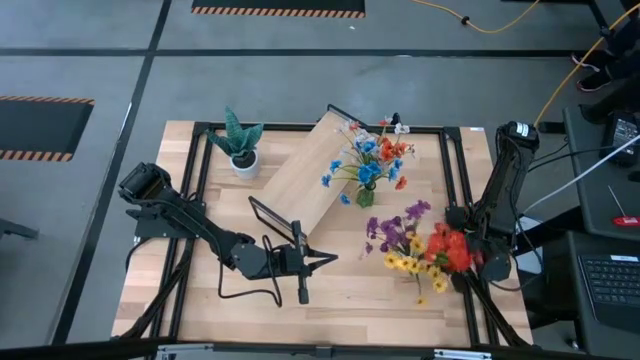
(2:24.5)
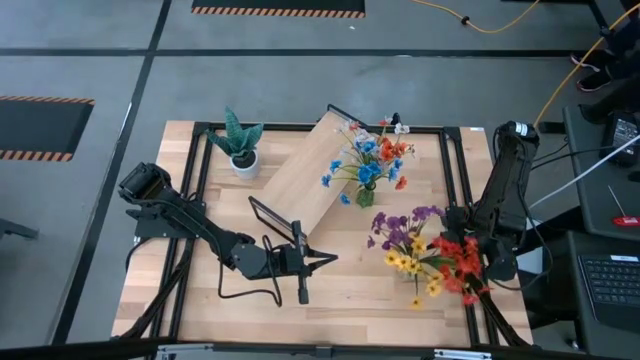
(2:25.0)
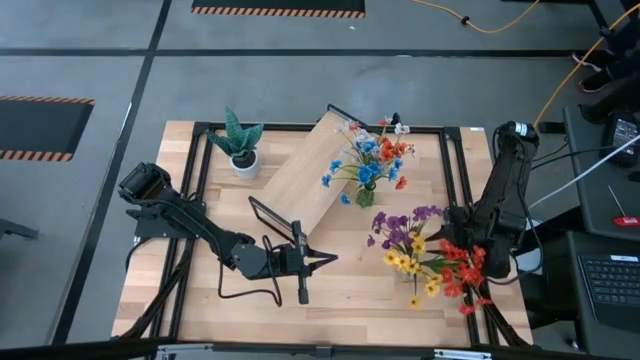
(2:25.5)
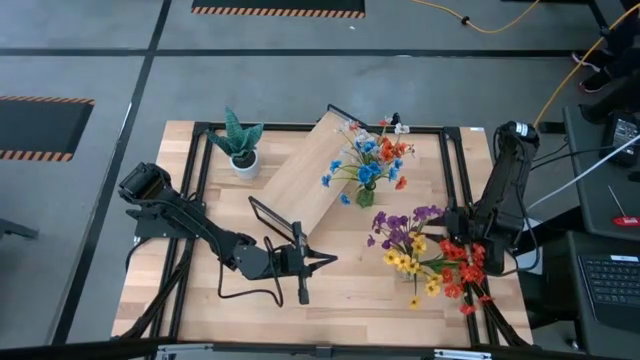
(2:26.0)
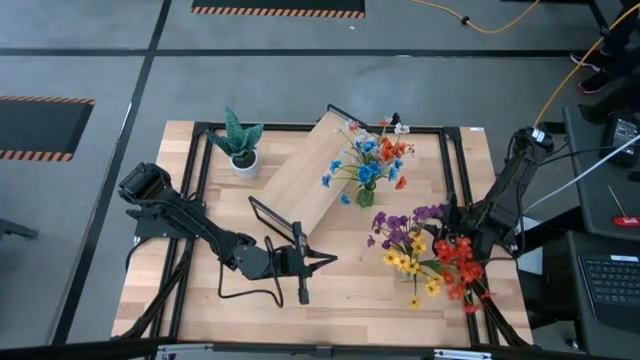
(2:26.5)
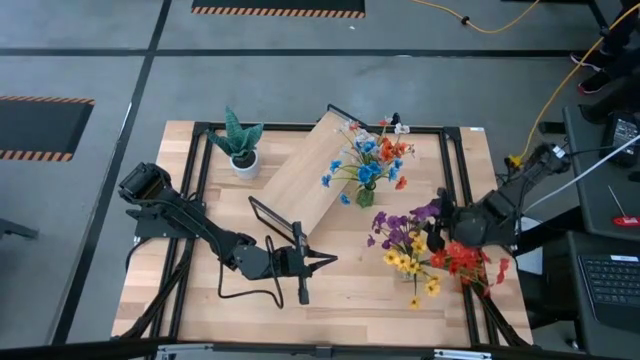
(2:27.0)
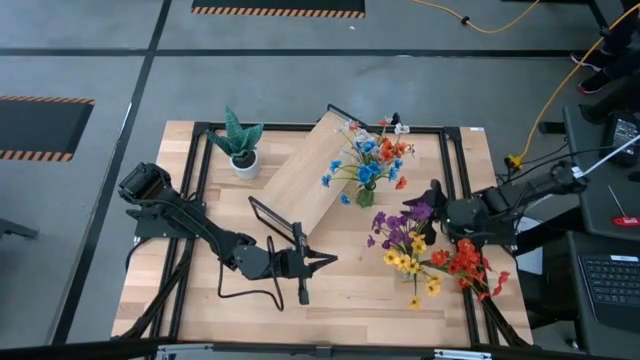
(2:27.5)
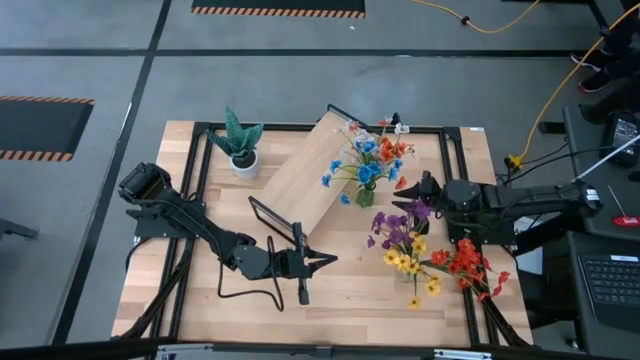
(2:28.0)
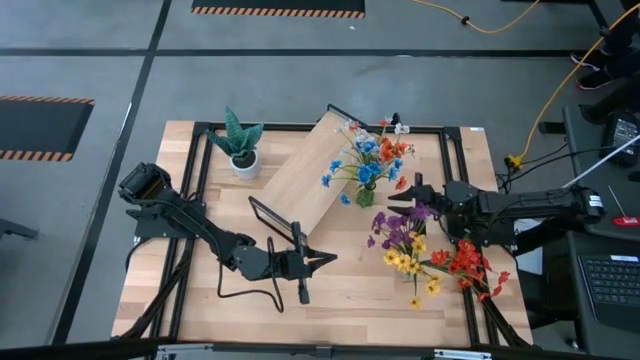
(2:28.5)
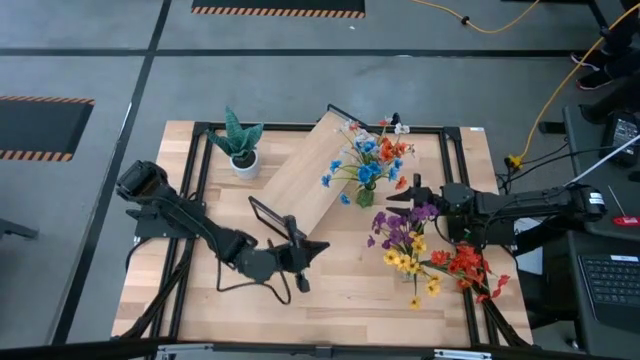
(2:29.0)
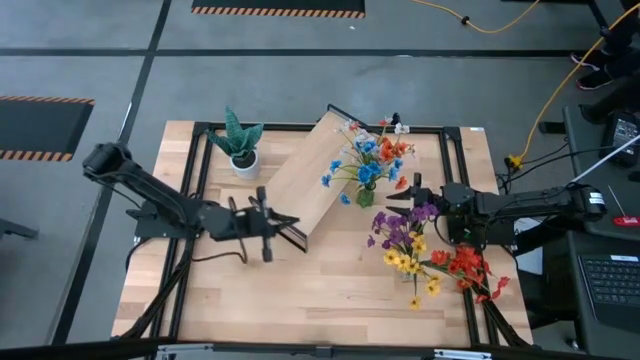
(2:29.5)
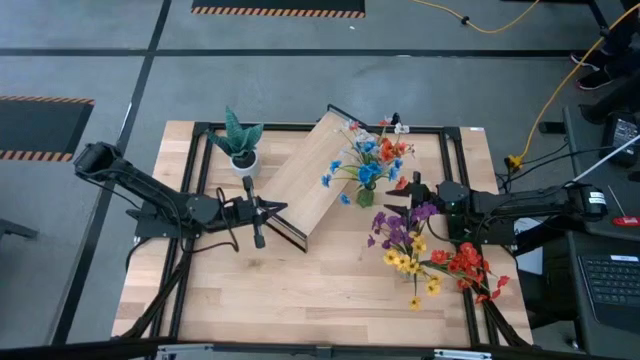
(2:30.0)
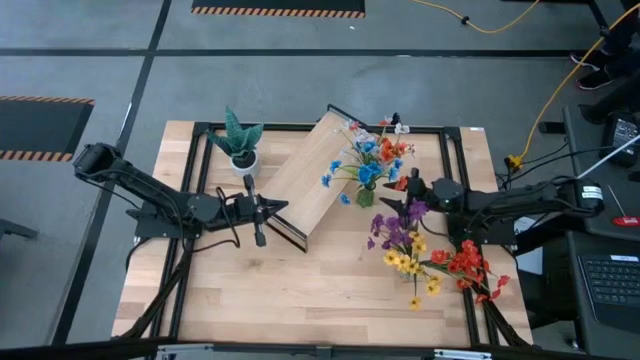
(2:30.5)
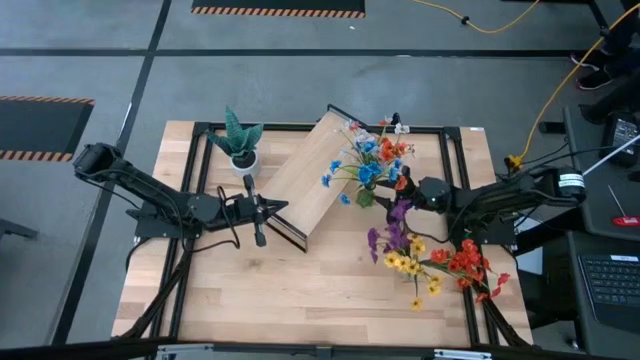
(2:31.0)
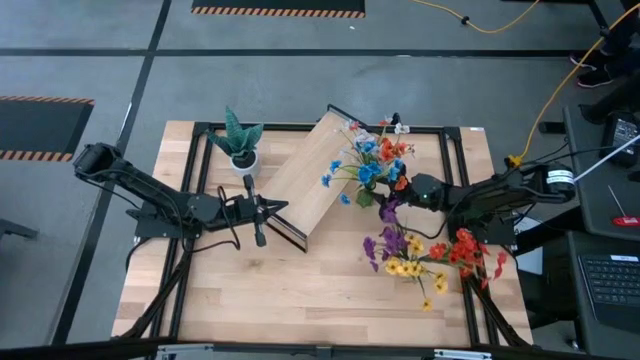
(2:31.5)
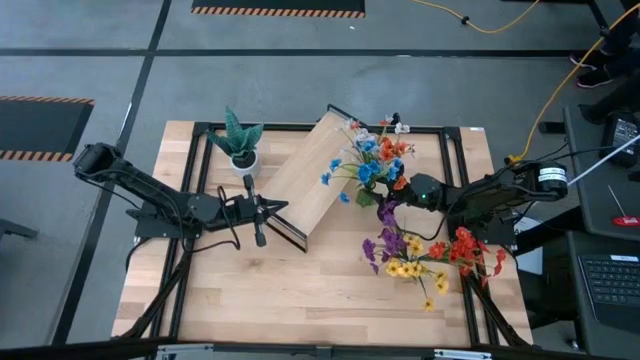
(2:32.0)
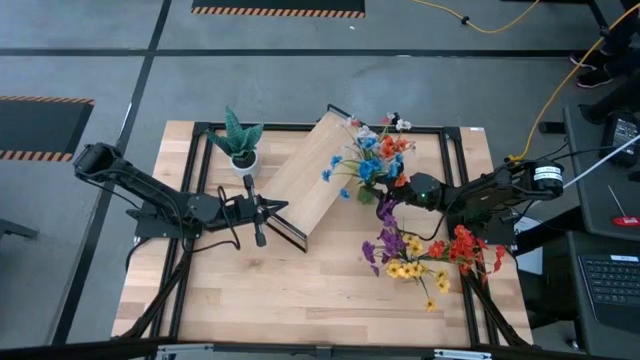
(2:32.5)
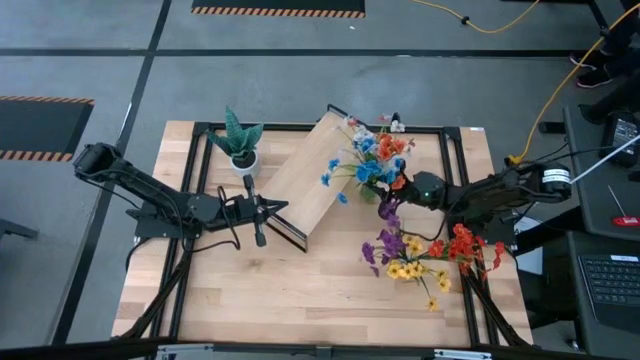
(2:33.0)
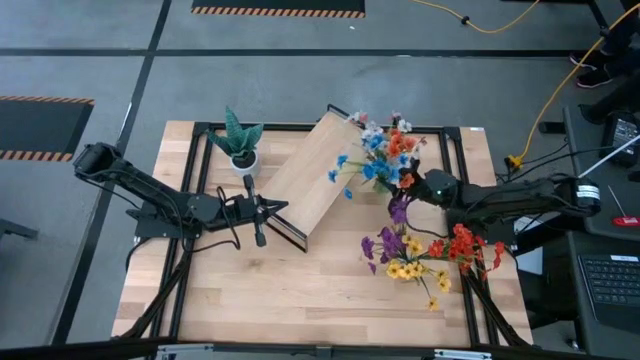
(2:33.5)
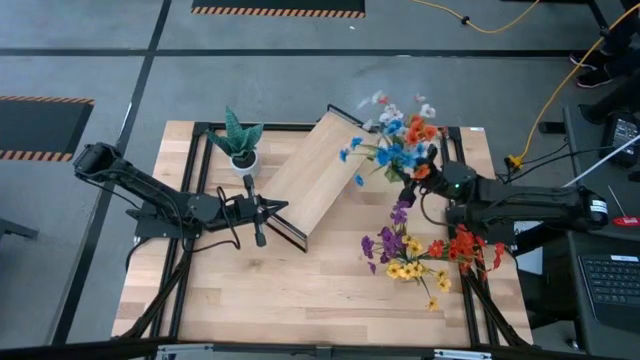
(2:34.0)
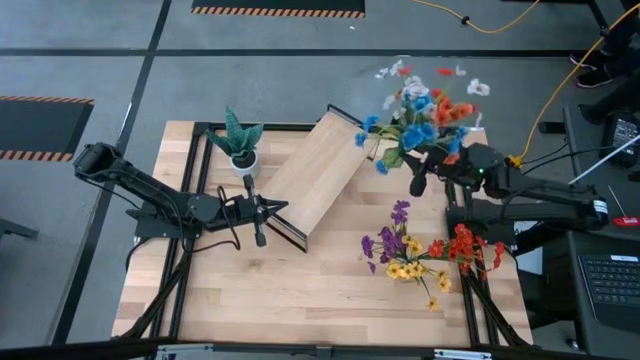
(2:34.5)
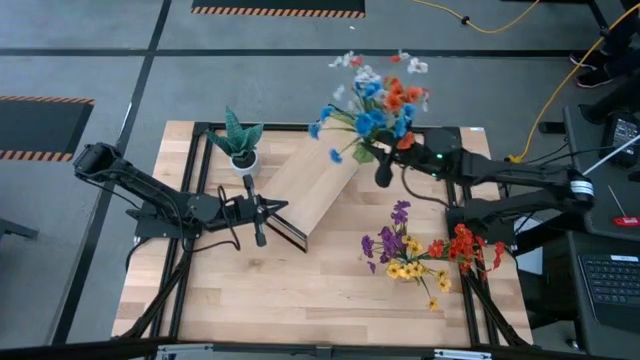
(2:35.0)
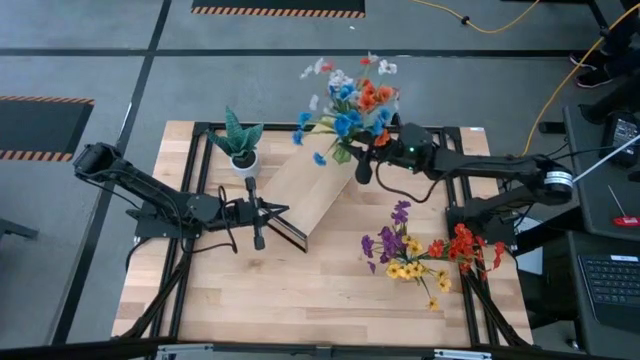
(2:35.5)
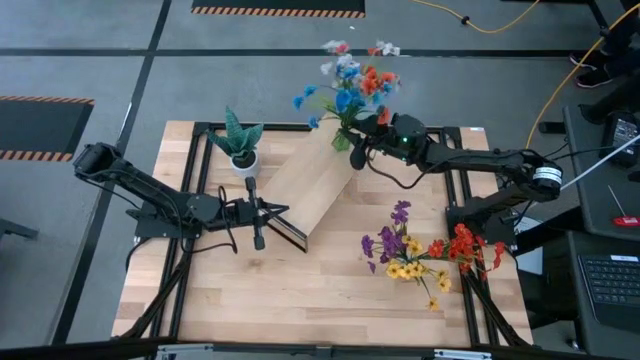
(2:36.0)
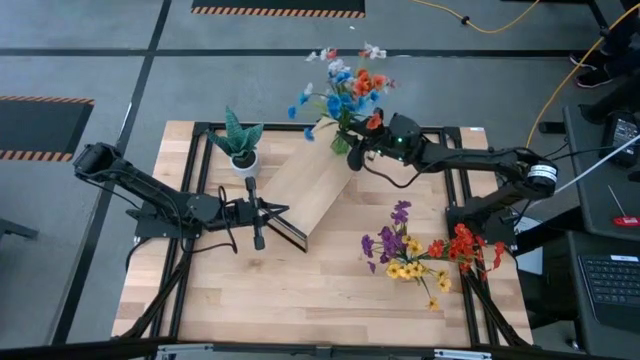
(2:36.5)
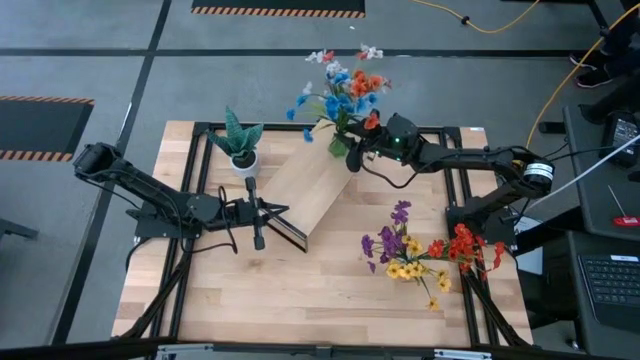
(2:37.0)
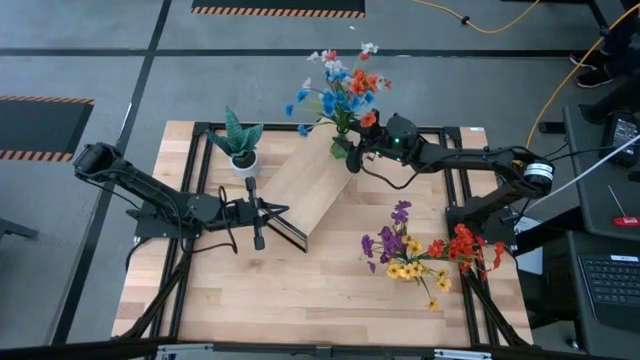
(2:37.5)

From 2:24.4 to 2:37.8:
Task: Pick and place flowers into a vace then onto a shelf
Put the green vase on the shelf

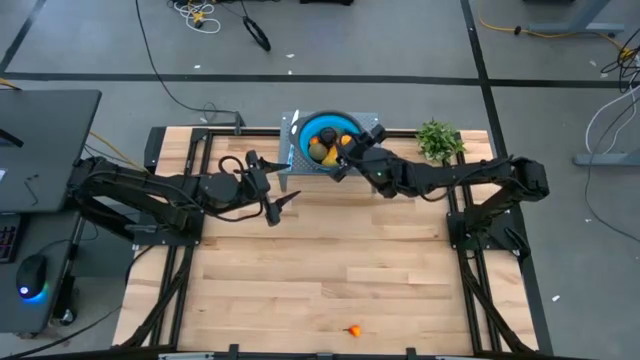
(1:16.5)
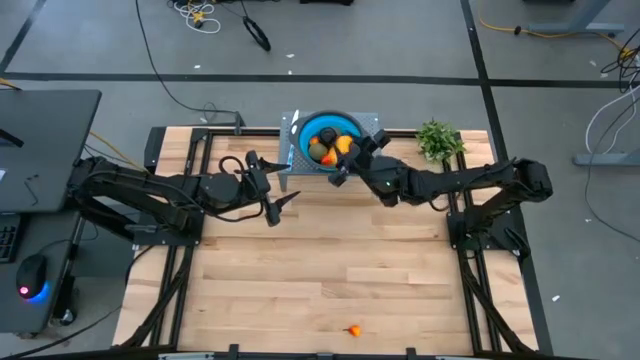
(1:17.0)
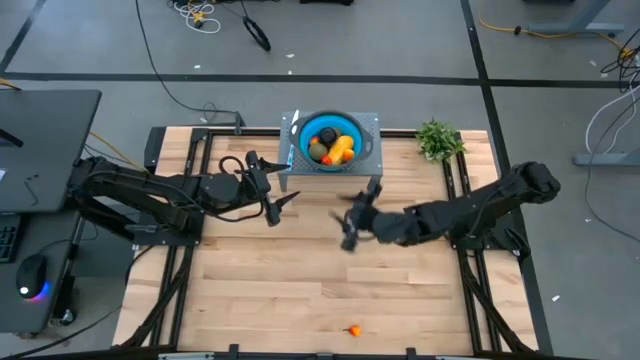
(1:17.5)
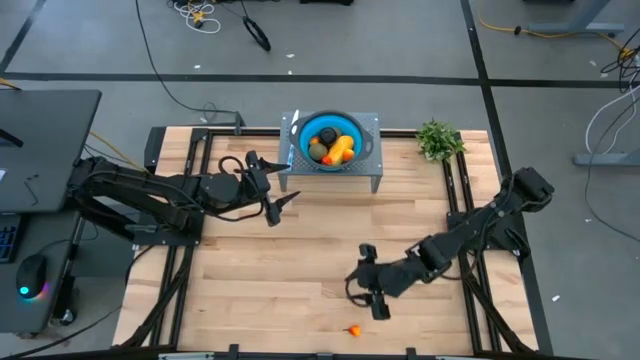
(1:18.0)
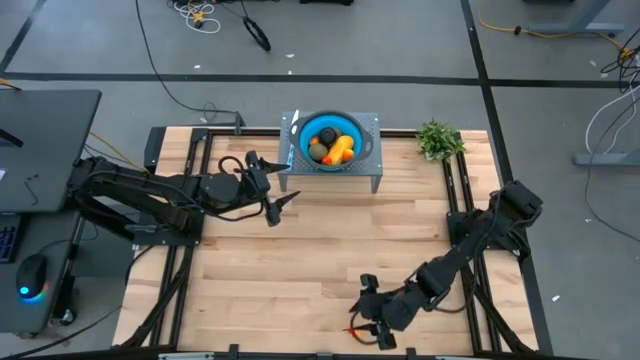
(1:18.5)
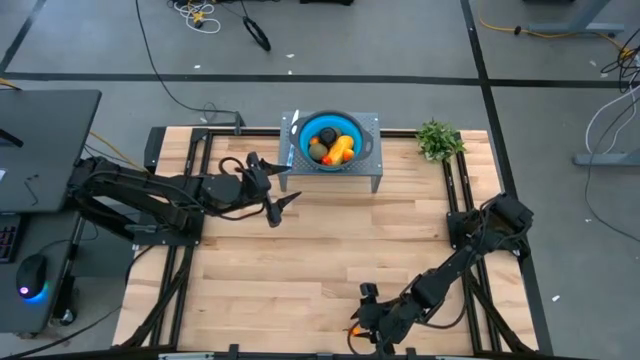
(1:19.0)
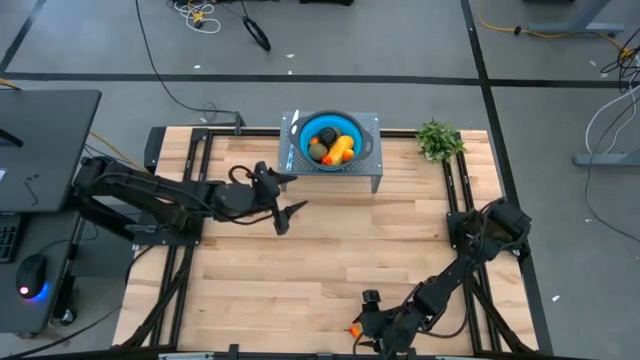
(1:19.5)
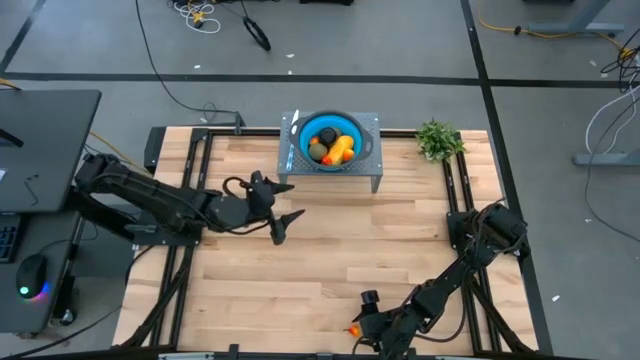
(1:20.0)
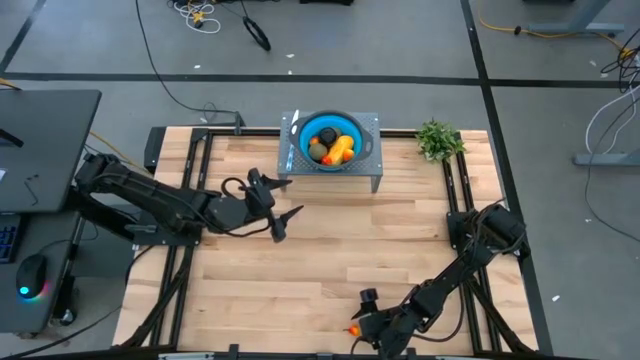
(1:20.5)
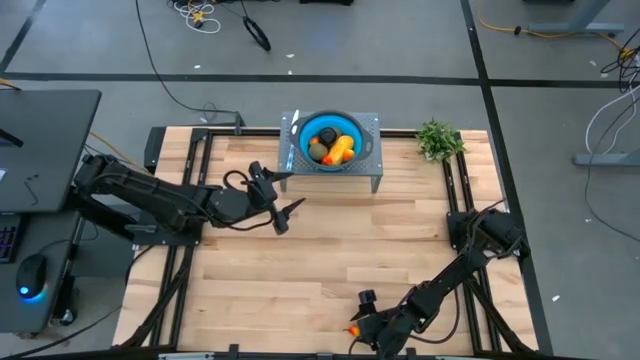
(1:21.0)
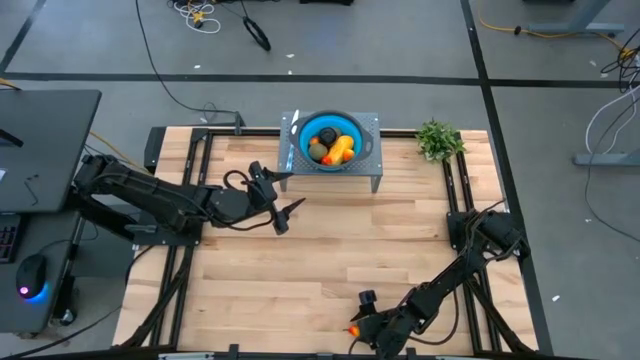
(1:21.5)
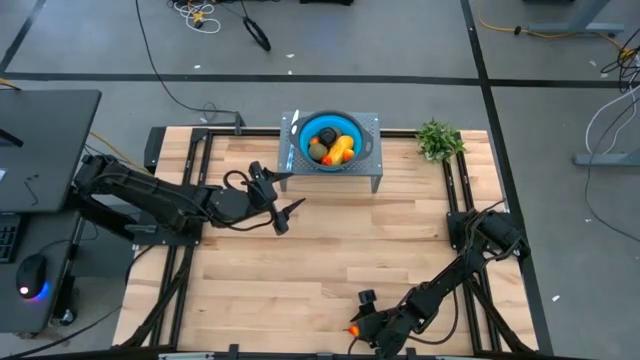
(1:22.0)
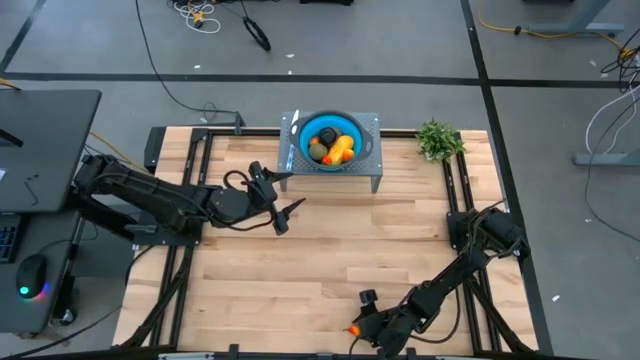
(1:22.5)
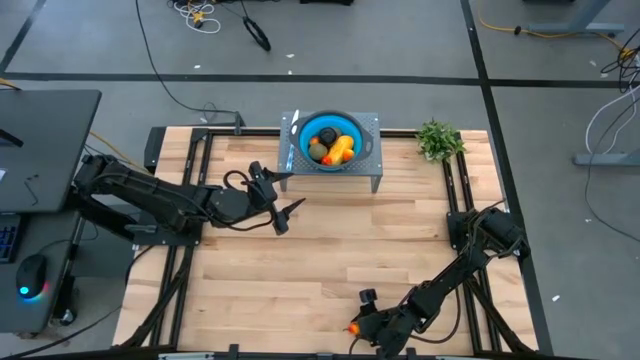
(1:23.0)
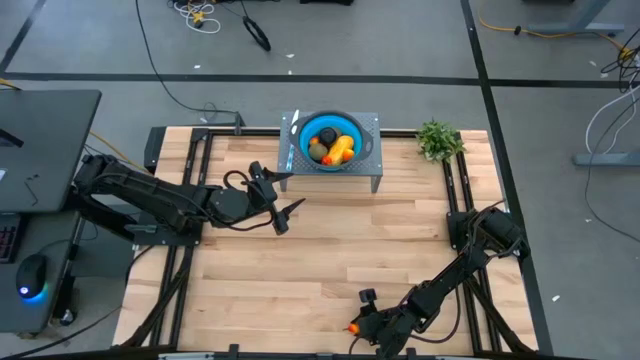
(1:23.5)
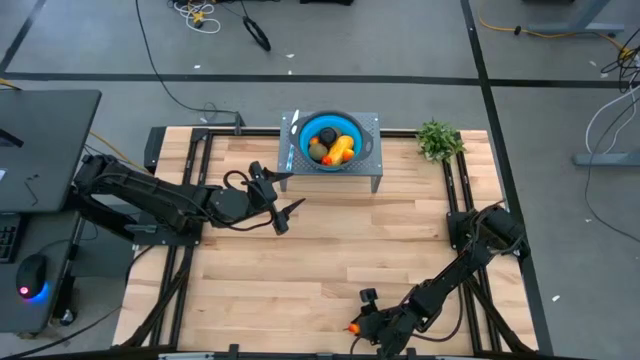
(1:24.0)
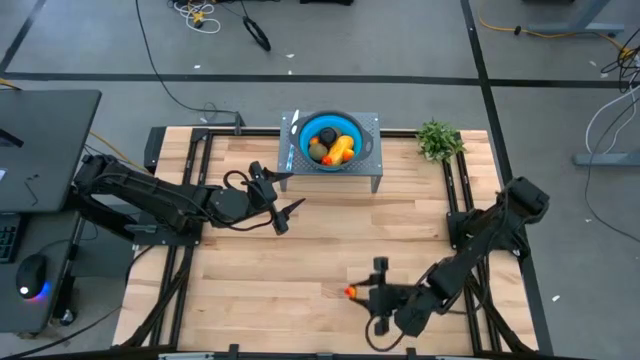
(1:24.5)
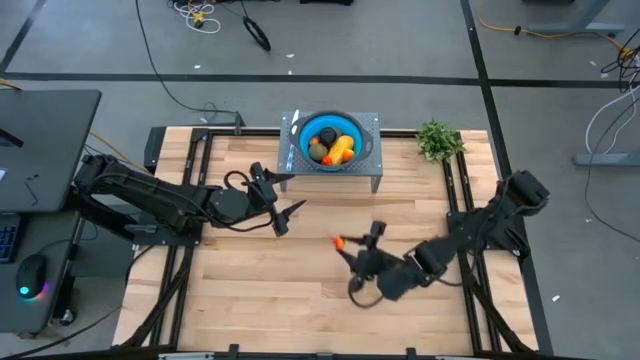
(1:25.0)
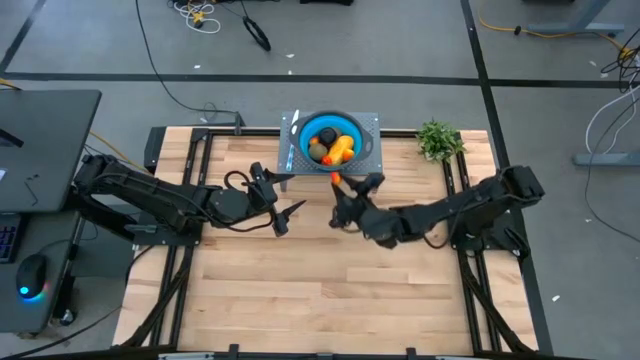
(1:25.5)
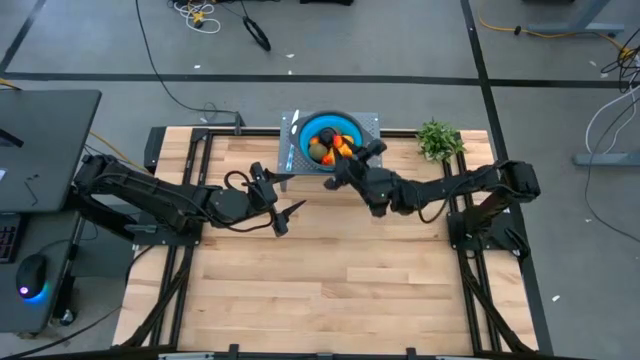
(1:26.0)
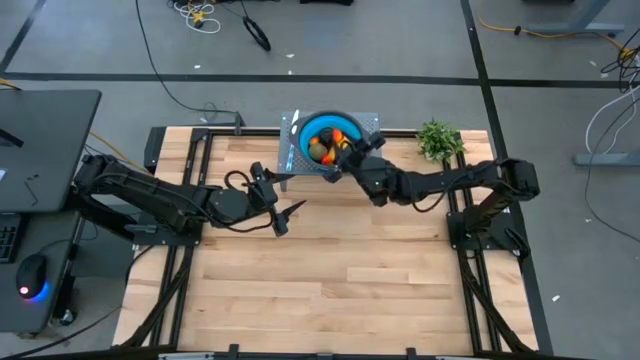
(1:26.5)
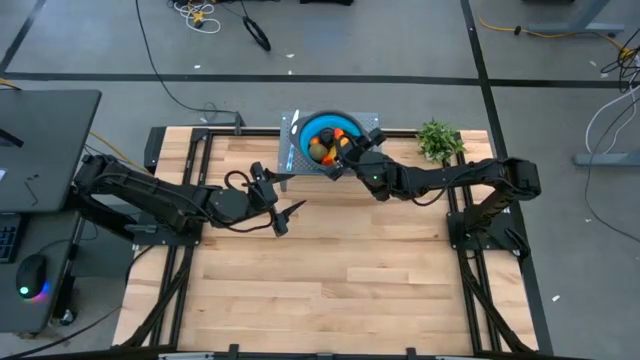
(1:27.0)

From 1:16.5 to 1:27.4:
Task: Pick & Place Fruit
Put the orange pear into the blue strainer bowl
